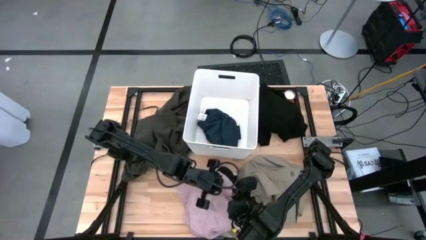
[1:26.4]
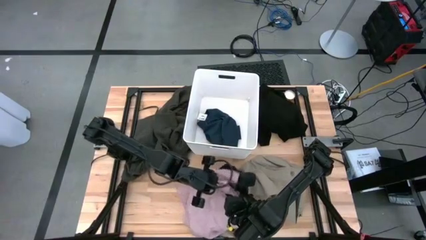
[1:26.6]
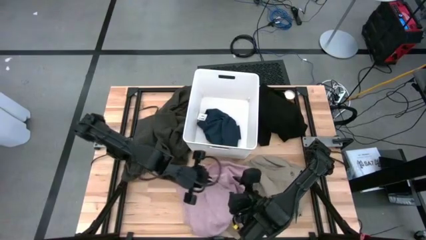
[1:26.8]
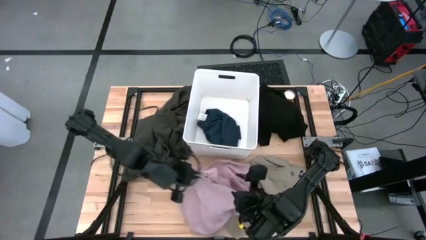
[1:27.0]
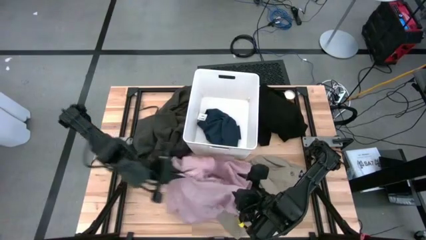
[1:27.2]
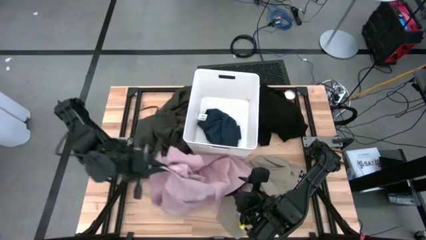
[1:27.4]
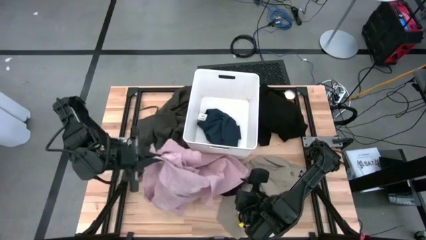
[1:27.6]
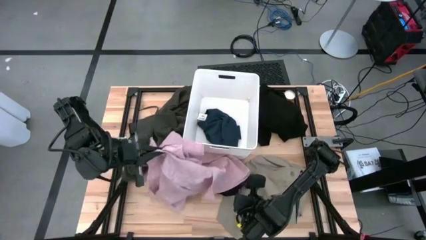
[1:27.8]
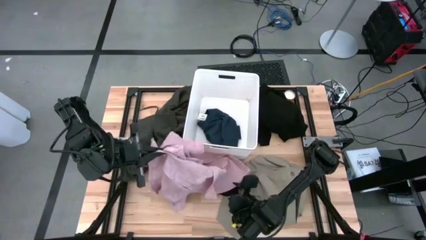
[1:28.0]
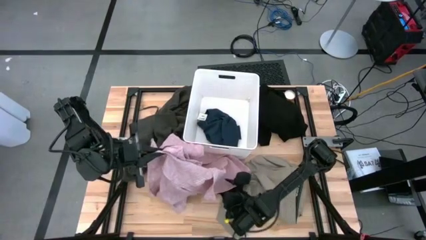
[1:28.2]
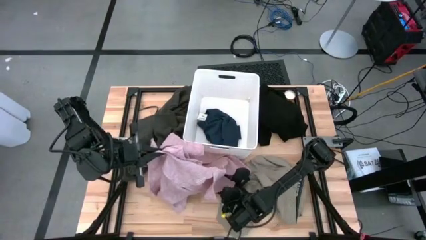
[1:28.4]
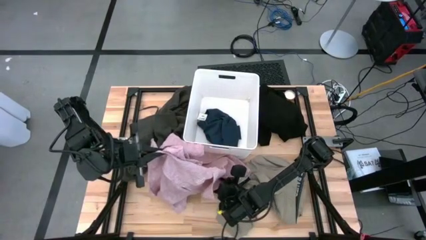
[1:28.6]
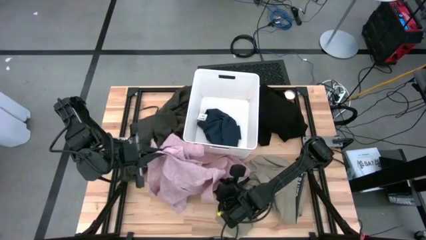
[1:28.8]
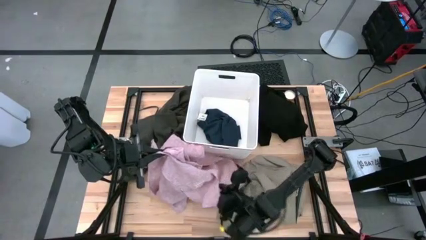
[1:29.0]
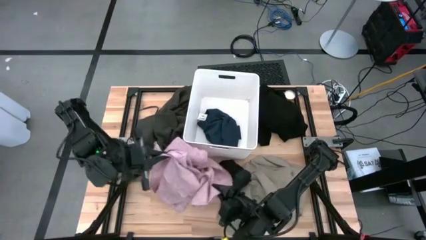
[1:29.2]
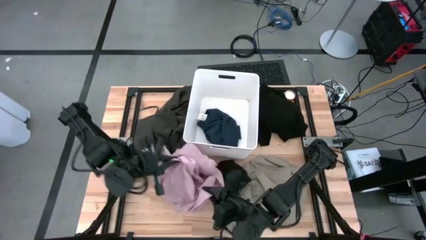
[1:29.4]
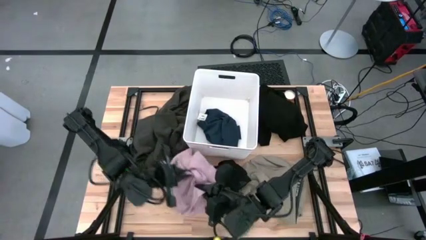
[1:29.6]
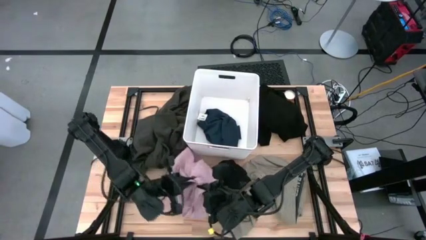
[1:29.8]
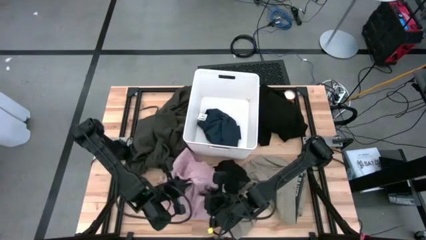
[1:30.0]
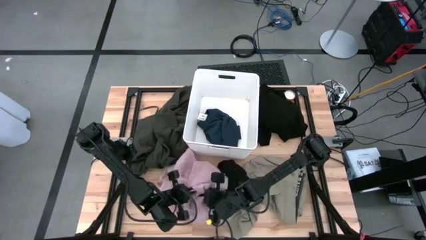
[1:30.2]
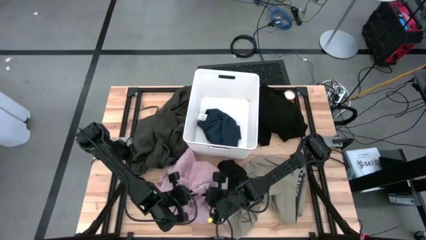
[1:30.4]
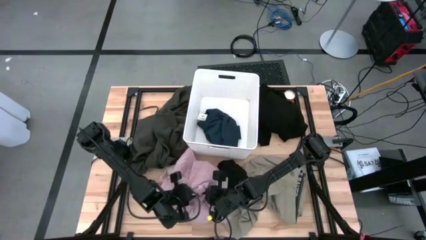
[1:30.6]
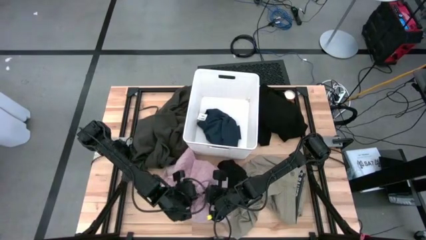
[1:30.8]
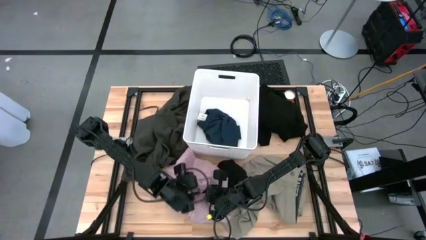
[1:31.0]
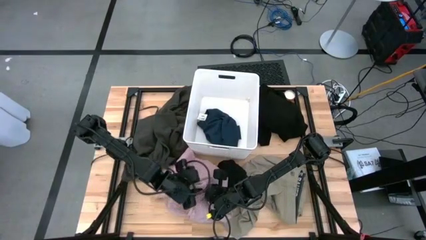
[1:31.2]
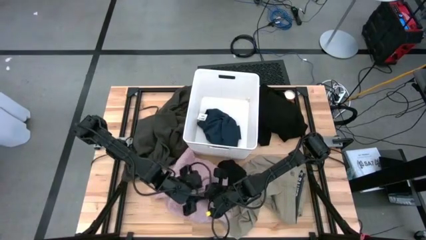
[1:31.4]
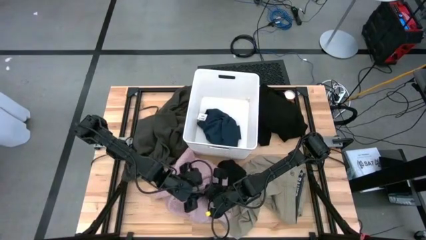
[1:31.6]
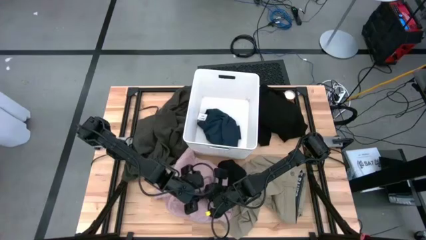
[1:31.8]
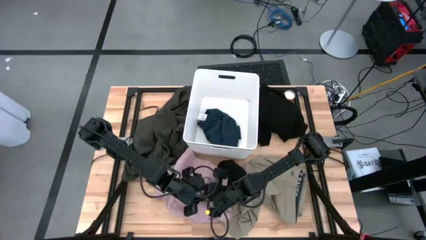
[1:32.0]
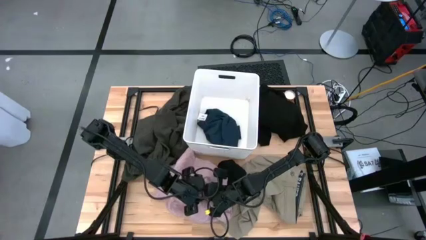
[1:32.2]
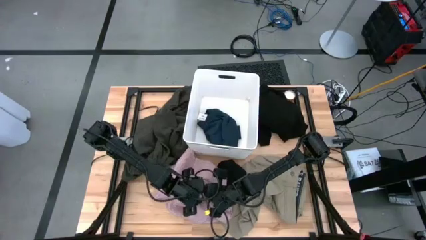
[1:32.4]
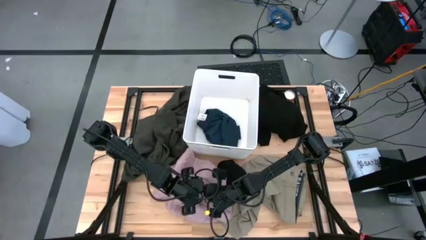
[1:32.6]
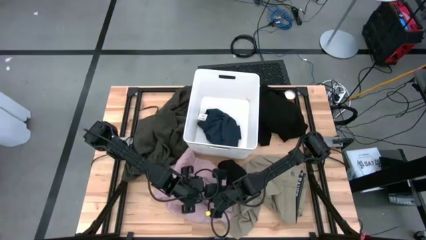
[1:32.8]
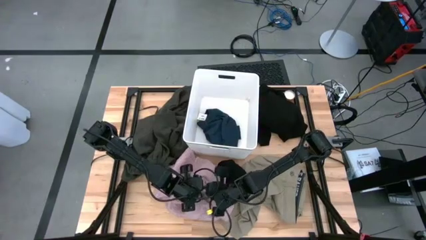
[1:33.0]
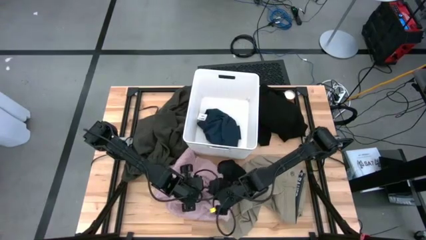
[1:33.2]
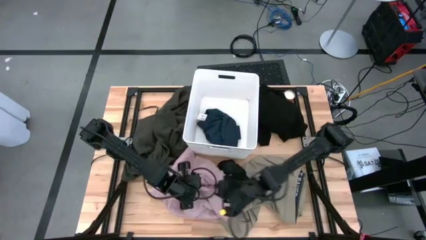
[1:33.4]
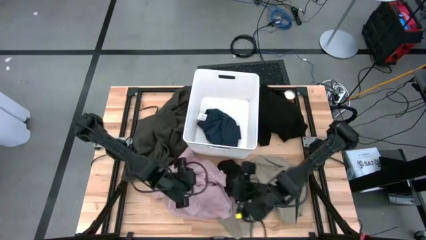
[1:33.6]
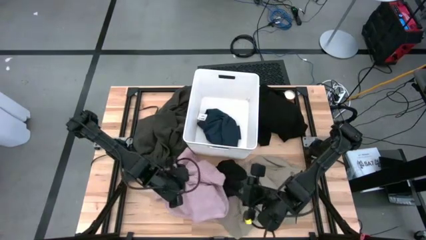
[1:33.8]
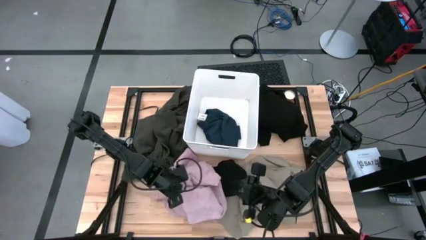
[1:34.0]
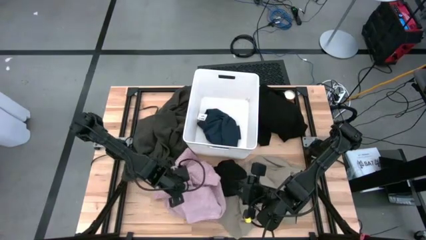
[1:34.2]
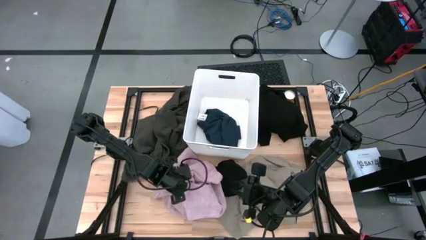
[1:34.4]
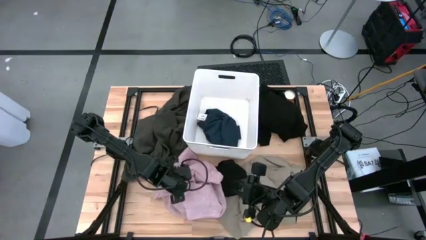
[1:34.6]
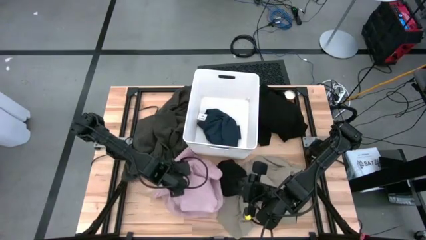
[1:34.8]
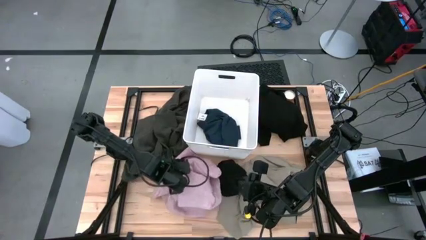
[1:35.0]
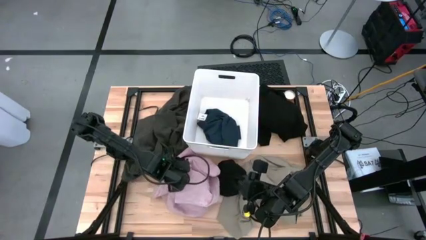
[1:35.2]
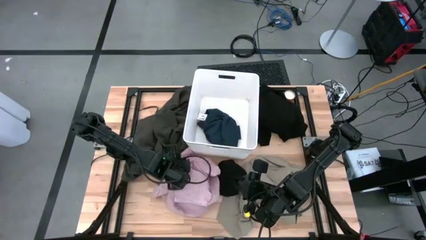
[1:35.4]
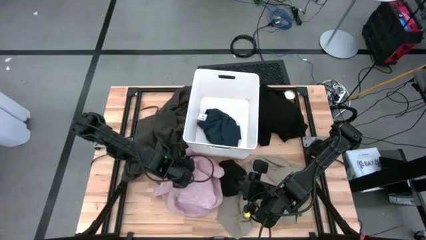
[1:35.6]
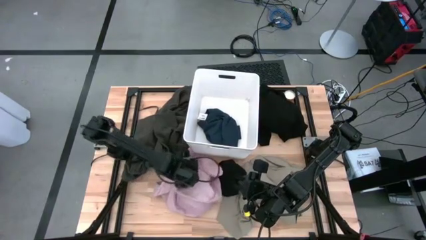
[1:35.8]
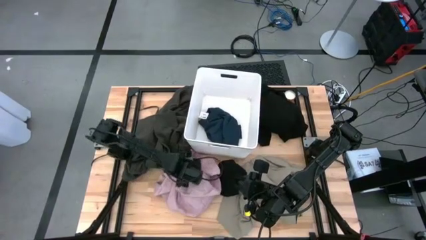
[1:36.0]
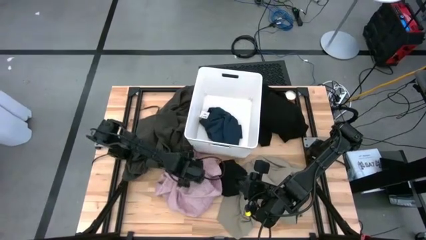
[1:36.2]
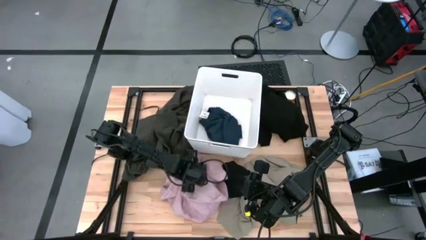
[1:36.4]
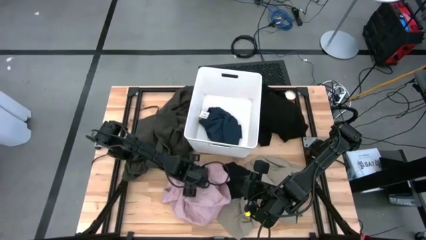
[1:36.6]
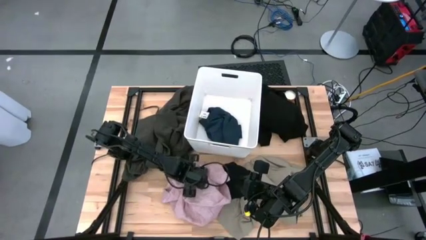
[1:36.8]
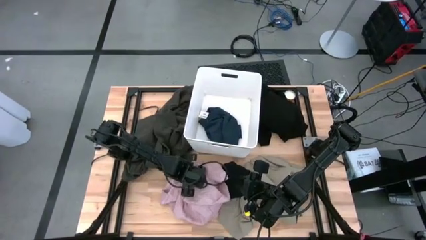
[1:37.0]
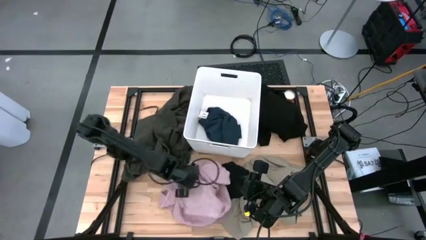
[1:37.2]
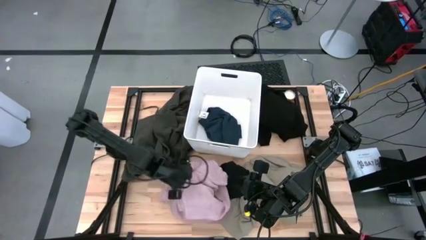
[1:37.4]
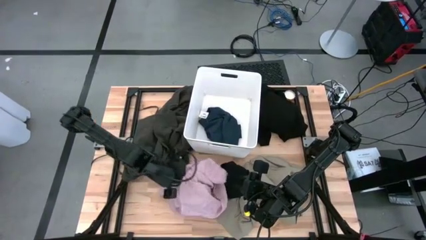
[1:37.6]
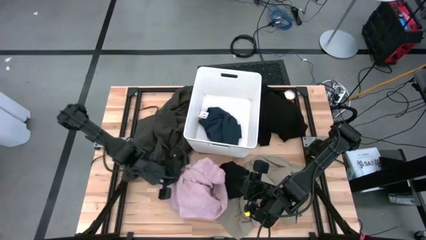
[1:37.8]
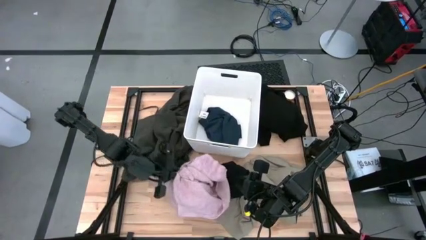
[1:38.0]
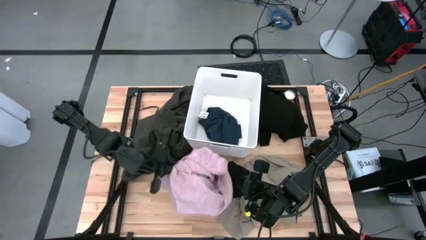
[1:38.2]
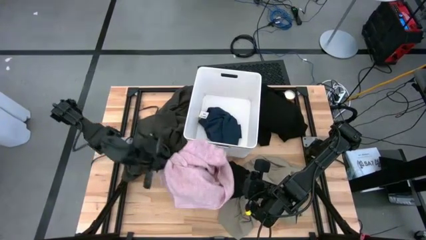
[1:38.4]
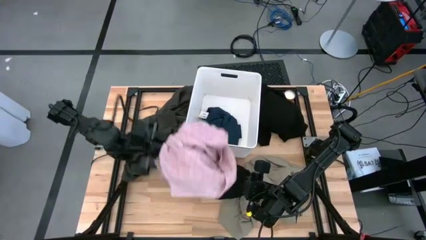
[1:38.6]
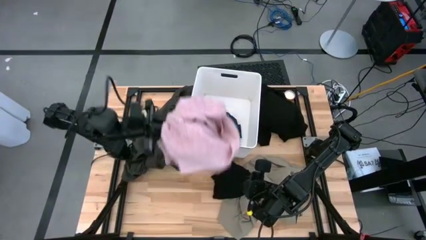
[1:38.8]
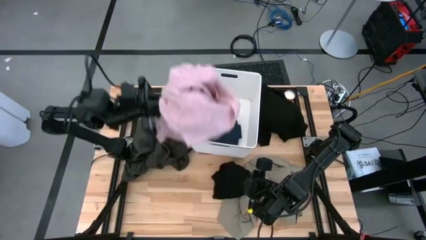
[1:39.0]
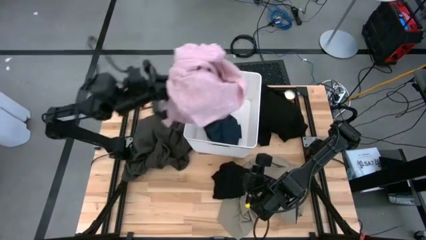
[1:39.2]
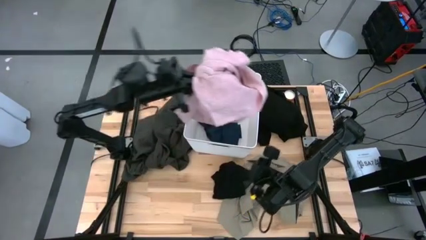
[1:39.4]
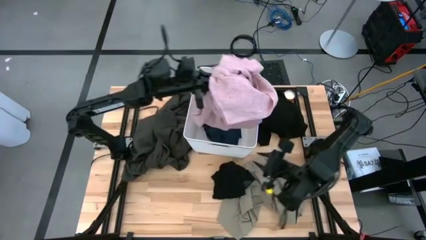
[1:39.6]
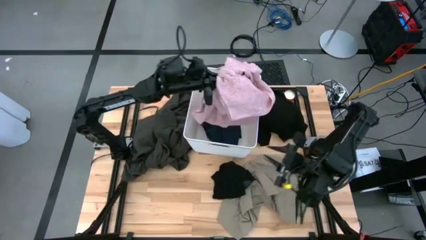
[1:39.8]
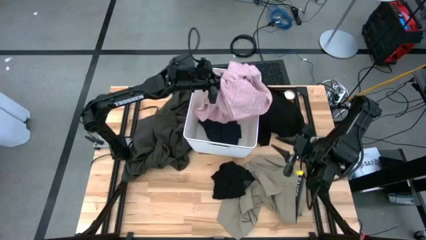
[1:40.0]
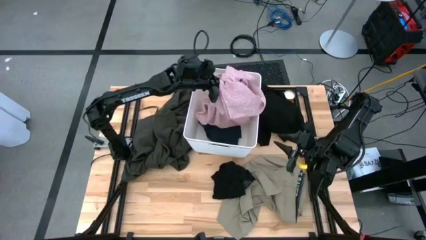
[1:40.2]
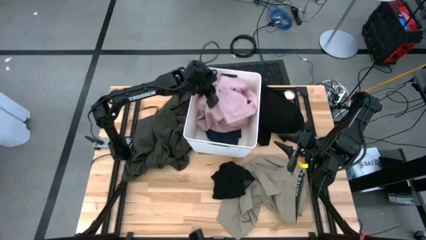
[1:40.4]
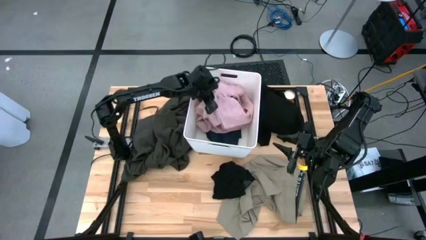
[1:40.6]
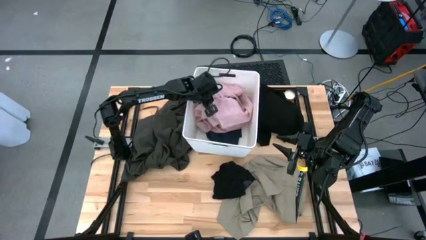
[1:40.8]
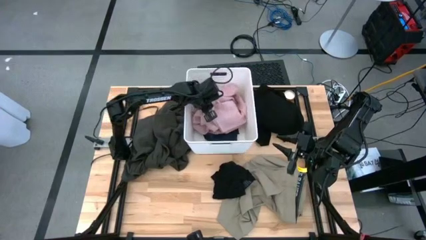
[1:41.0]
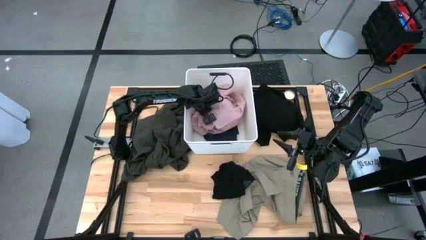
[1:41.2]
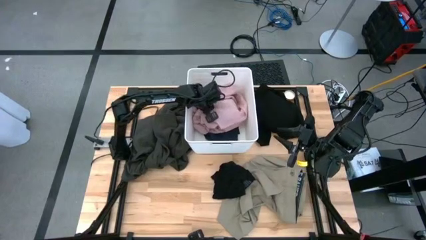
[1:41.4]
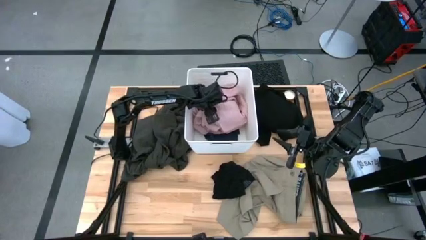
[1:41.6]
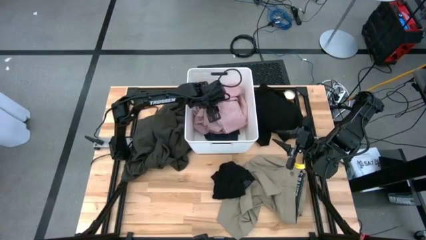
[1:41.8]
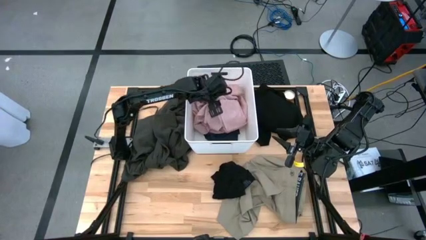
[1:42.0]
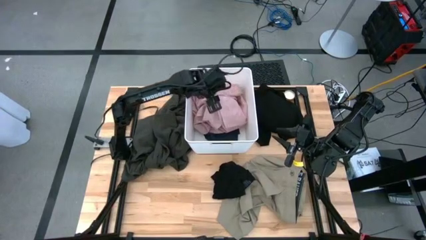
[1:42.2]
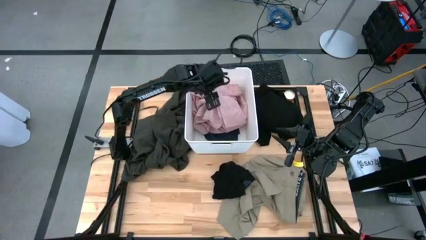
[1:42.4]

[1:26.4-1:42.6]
Task: Sort clothes
Put the pink shirt into the white laundry bin
